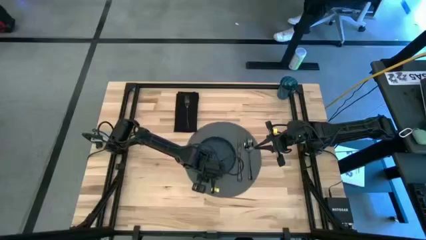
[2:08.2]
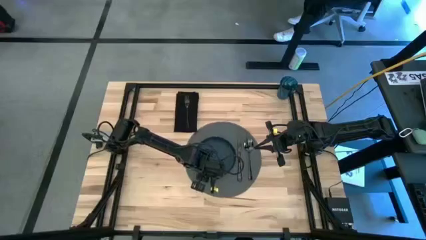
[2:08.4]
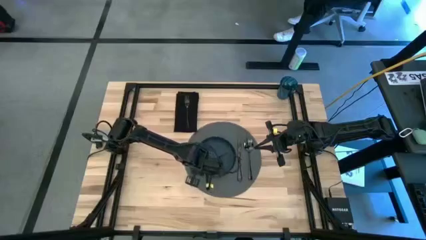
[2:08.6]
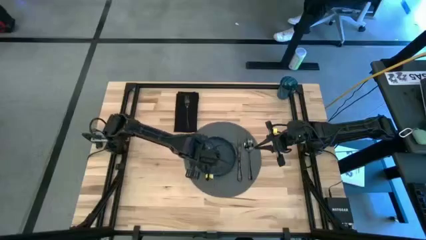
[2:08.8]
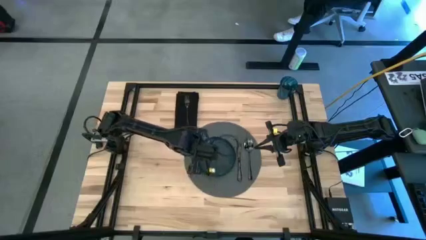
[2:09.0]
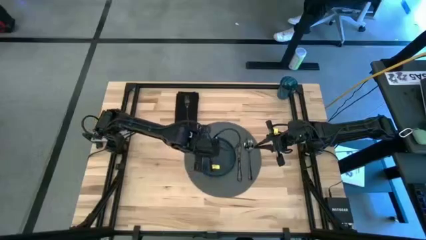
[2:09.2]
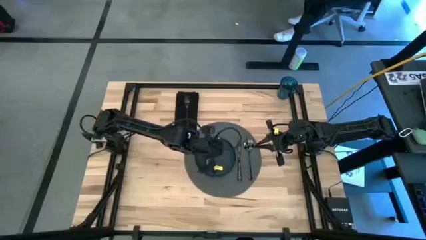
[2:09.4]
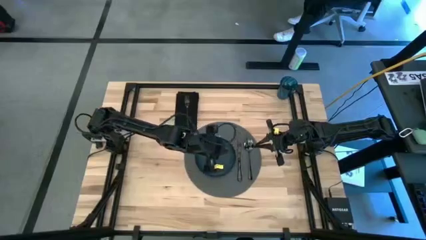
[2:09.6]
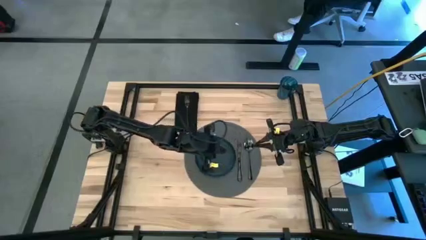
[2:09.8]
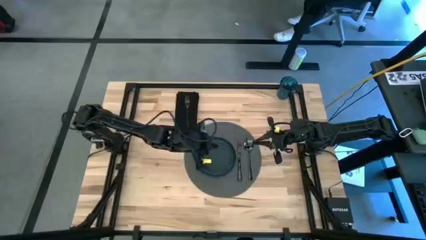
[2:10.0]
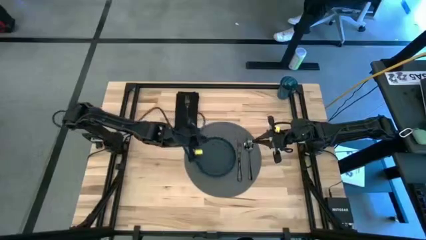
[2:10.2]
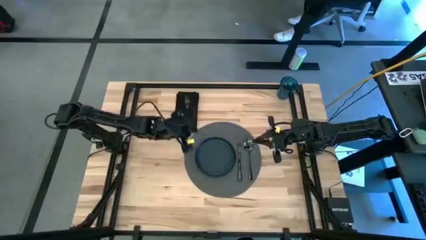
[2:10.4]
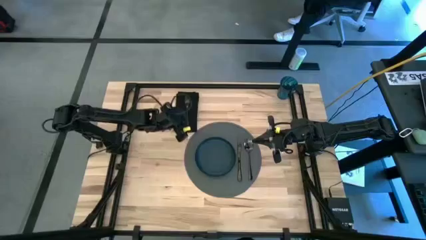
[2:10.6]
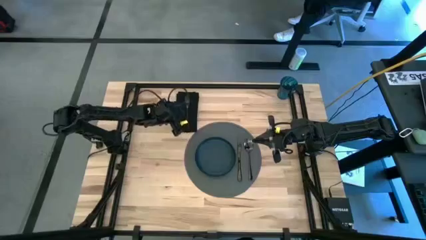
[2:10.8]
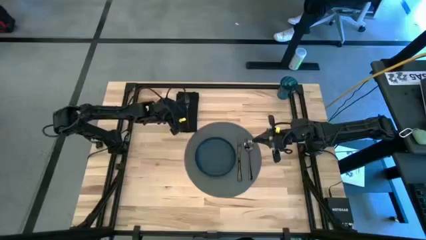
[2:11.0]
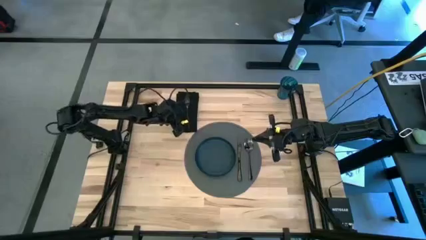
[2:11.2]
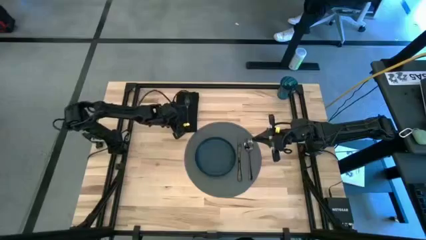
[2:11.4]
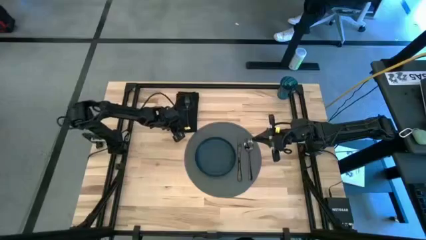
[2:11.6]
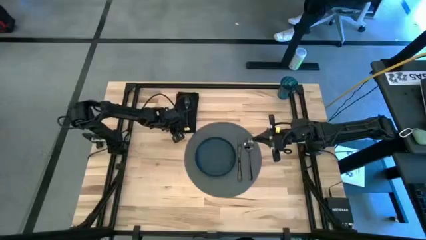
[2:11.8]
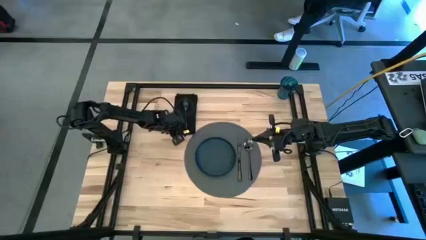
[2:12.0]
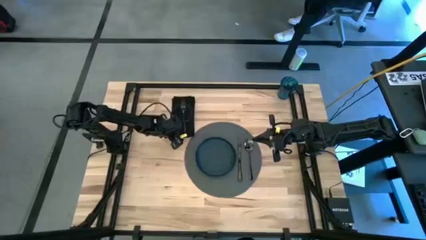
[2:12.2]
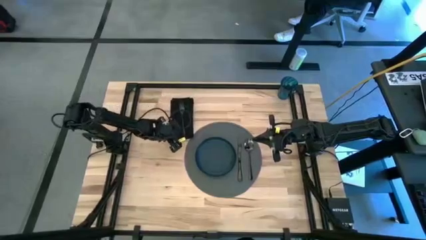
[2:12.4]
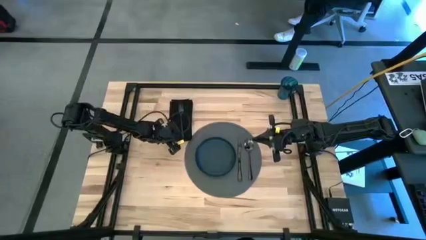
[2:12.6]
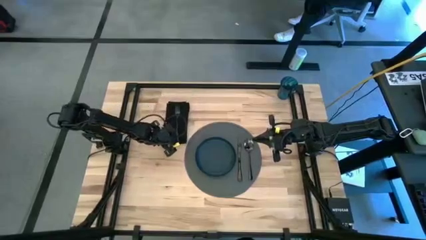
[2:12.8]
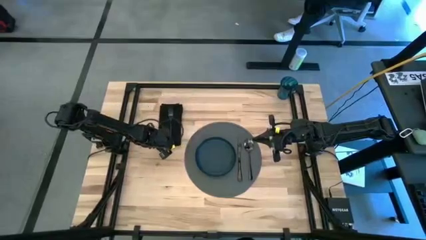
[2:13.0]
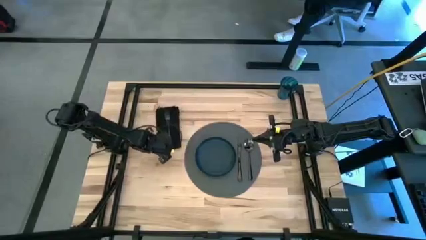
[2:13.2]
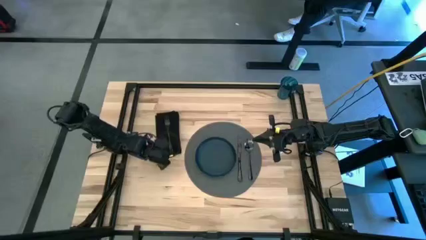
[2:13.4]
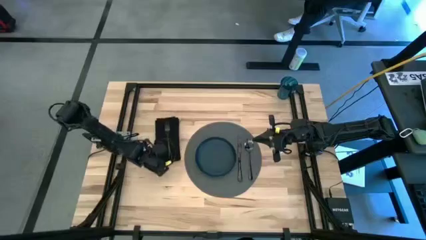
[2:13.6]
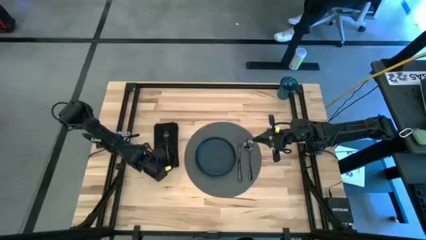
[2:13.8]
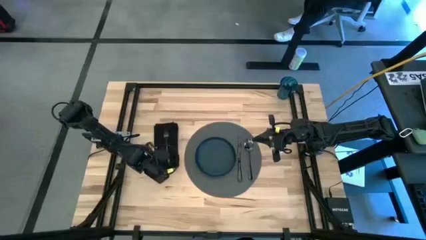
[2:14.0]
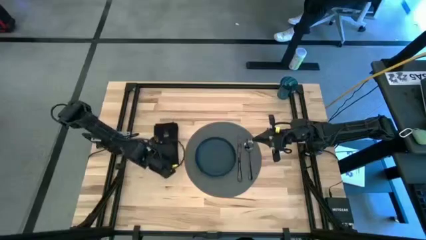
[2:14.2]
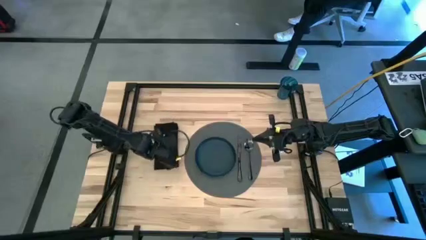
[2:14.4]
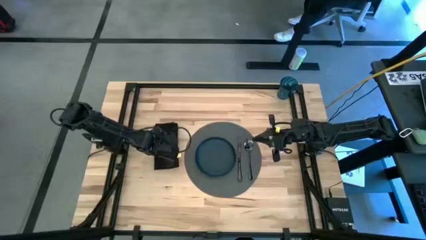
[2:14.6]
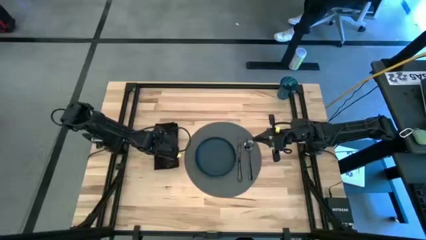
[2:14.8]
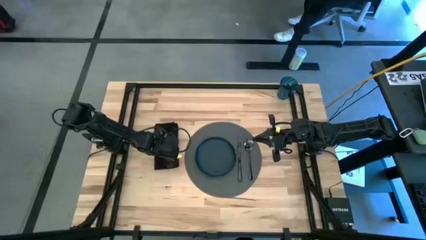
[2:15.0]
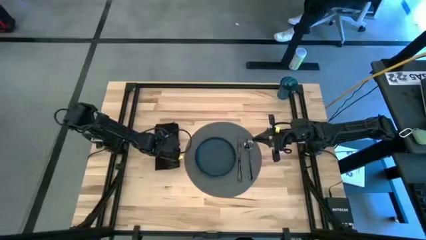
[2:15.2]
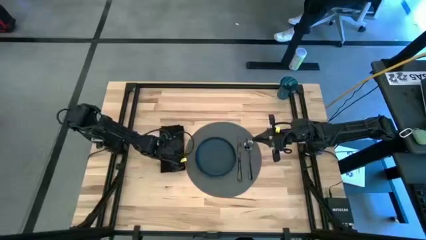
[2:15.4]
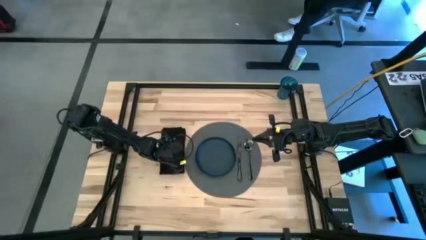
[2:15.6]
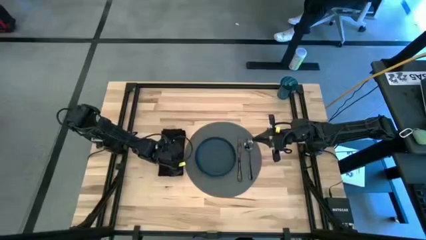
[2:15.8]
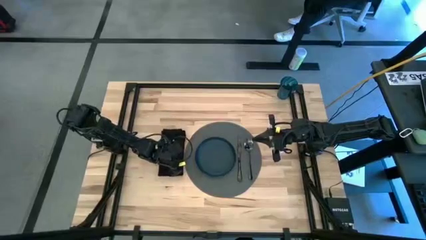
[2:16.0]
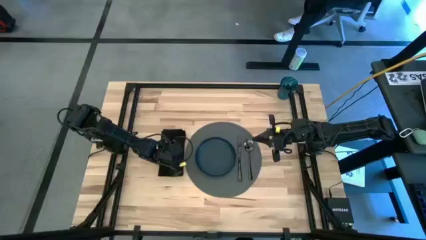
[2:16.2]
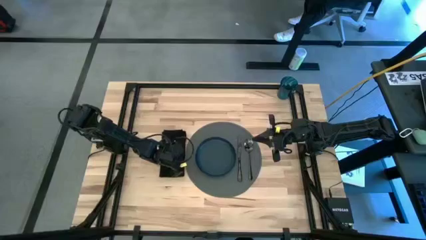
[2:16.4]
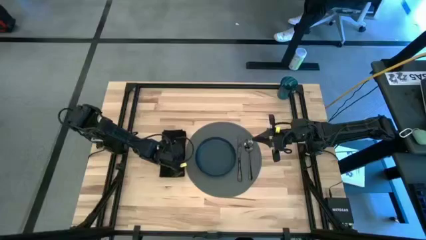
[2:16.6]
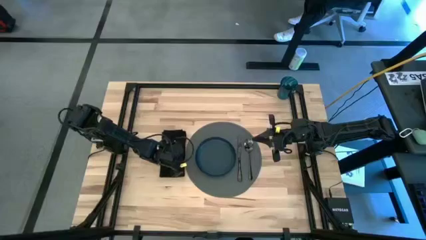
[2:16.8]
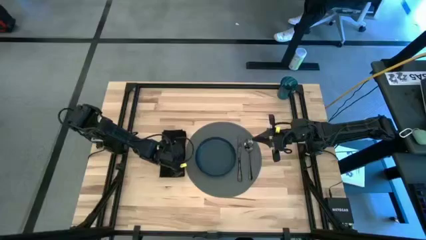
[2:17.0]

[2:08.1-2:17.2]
Task: Set table place
Move the black table napkin with fork to the left of the gray tablemat

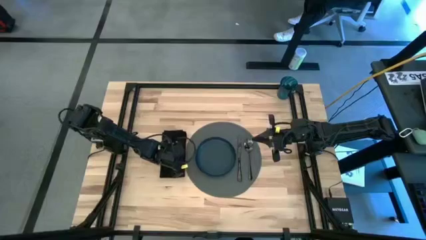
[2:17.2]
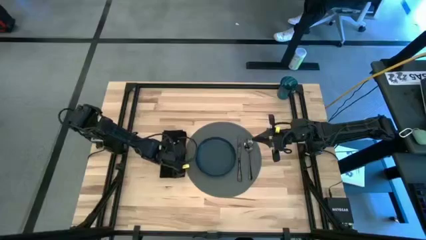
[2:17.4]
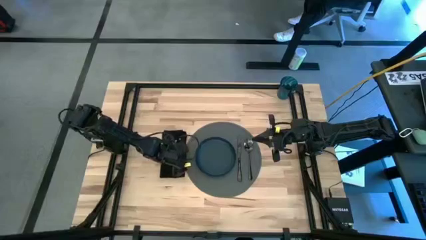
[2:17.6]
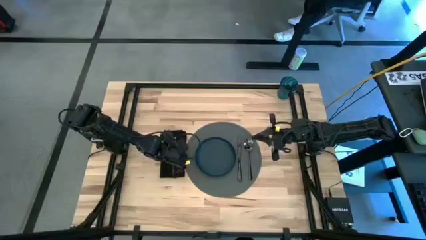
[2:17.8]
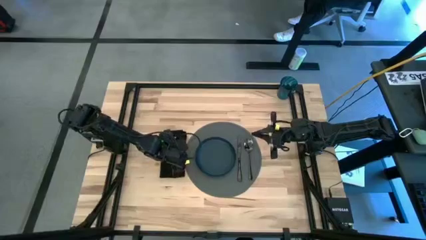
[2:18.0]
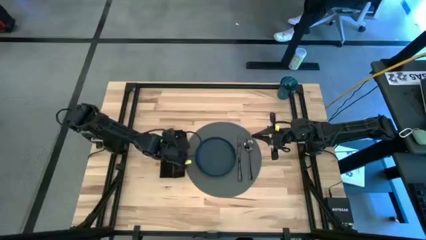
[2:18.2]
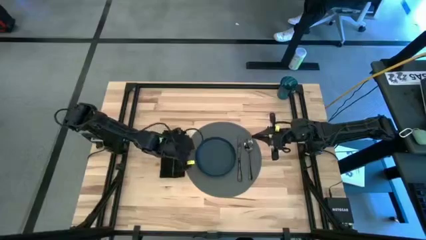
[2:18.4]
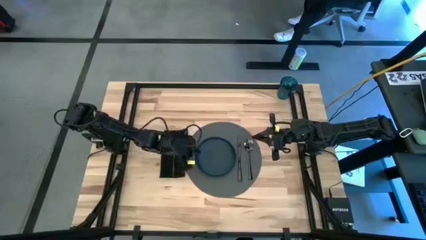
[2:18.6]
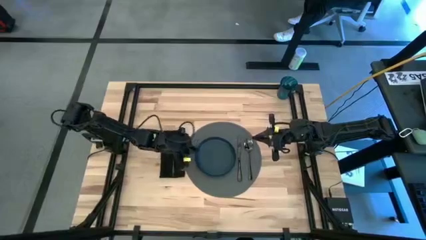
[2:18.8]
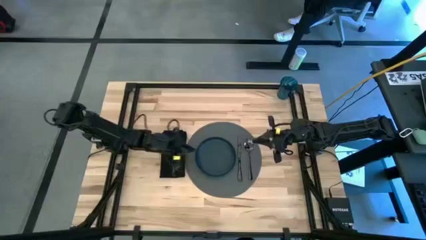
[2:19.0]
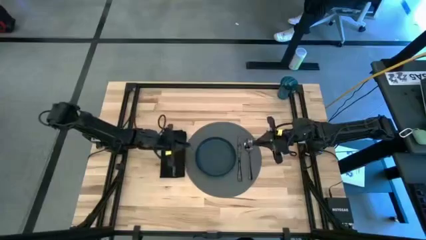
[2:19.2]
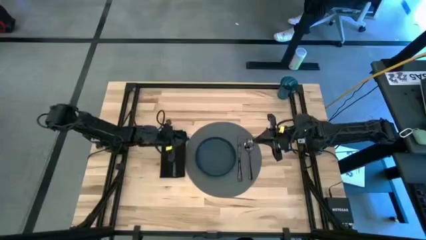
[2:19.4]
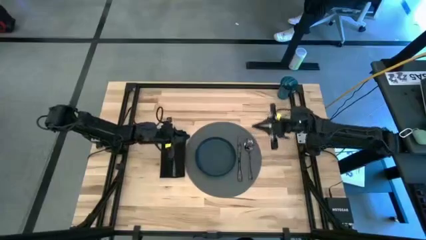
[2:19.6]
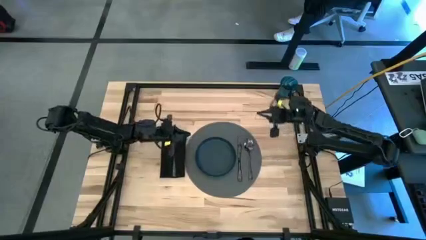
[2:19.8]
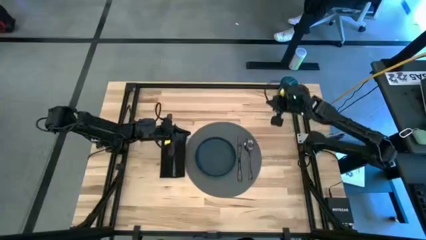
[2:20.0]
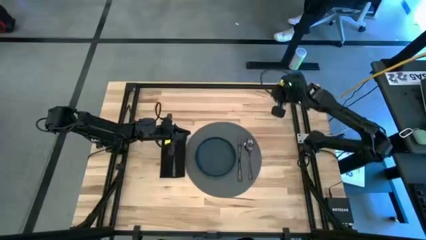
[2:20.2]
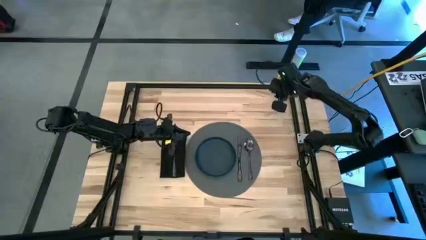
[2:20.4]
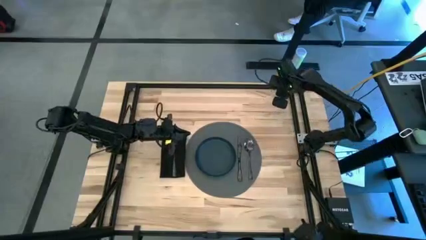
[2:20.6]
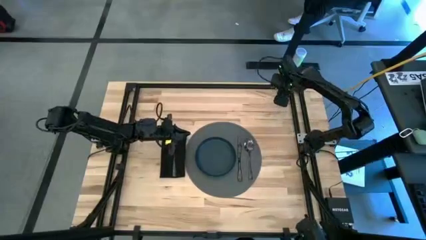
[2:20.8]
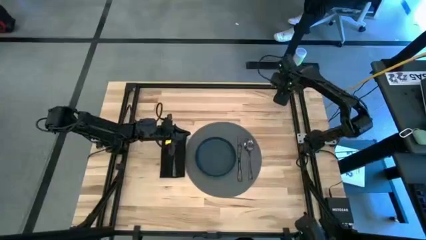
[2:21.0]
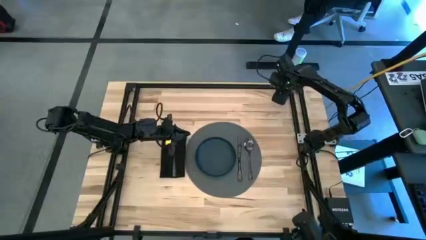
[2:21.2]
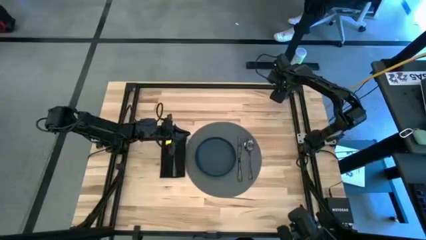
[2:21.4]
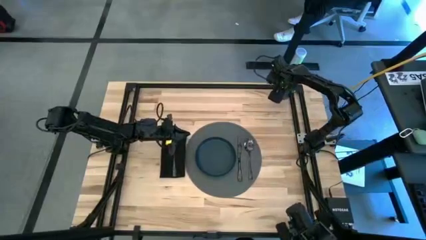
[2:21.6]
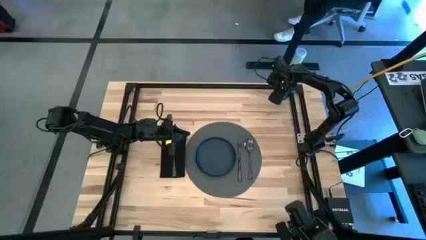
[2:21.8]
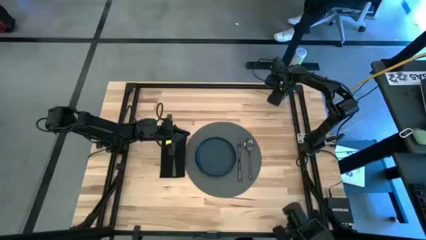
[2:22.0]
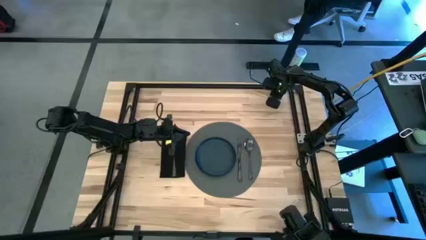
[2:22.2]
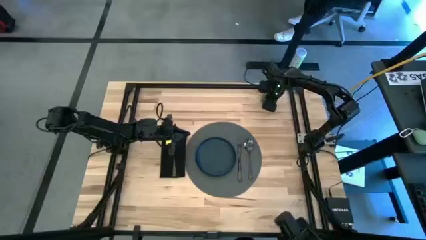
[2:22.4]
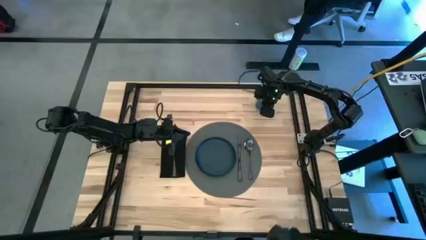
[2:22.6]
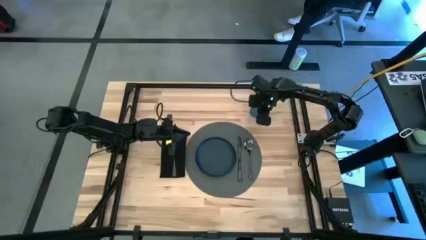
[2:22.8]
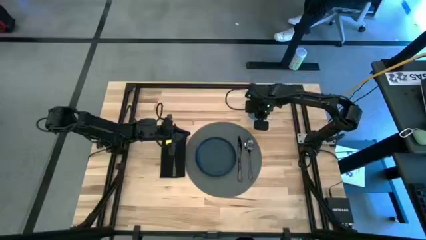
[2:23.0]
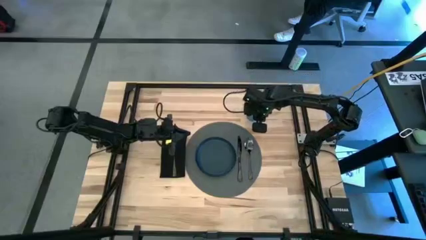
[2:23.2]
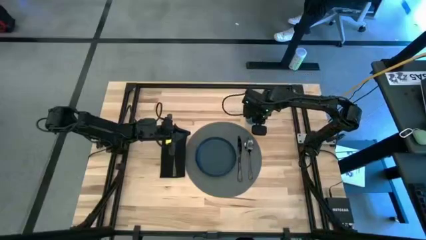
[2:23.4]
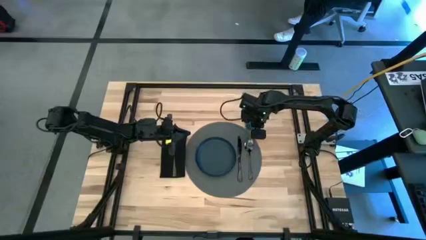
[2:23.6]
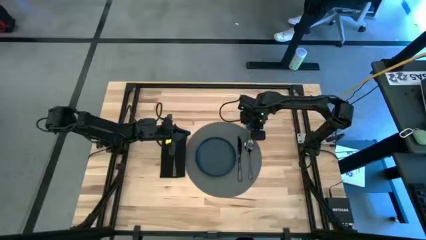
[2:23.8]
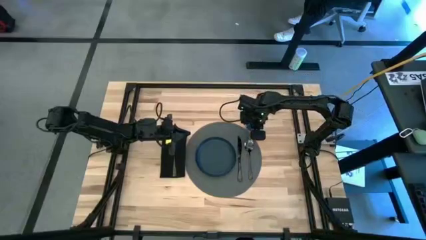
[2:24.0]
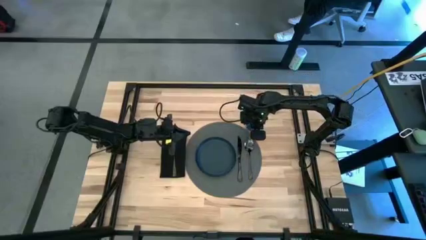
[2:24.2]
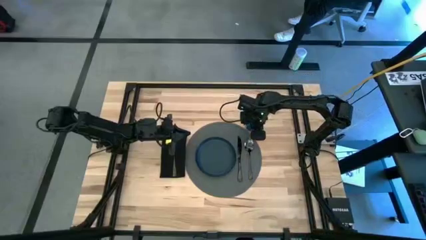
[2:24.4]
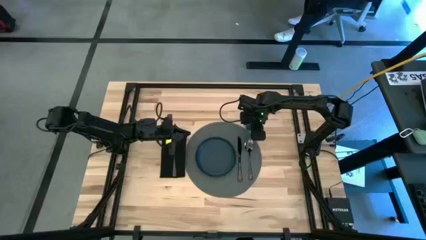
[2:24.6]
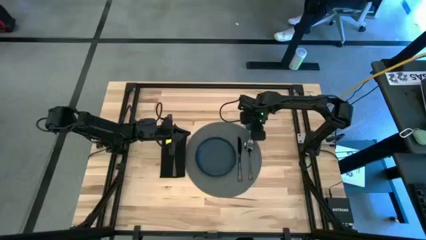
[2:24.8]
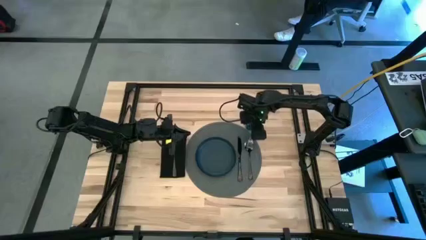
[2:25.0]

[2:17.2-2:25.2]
Put the blue cup to the top of the silverware on the gray tablemat
